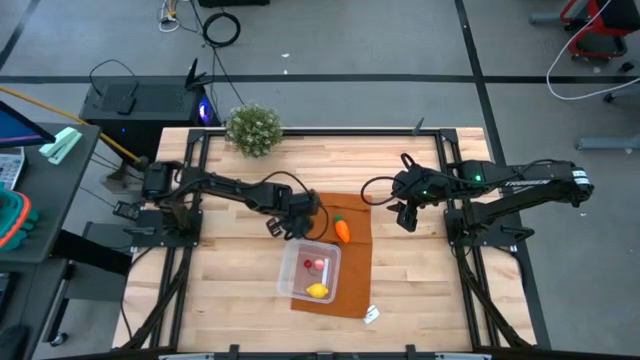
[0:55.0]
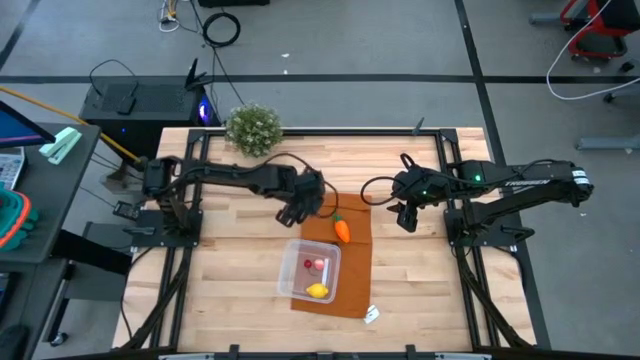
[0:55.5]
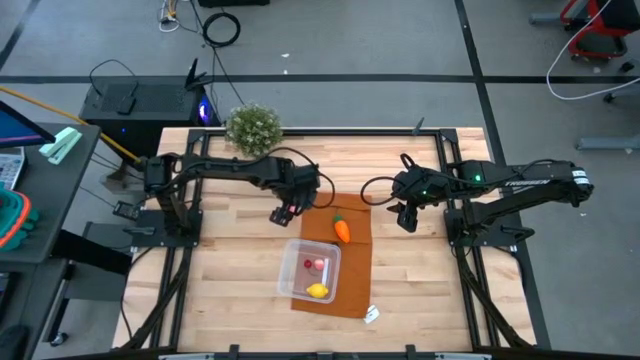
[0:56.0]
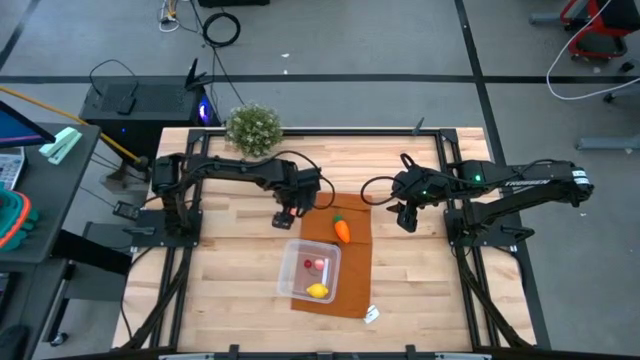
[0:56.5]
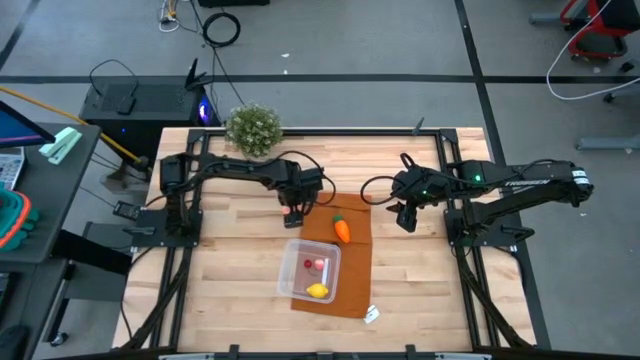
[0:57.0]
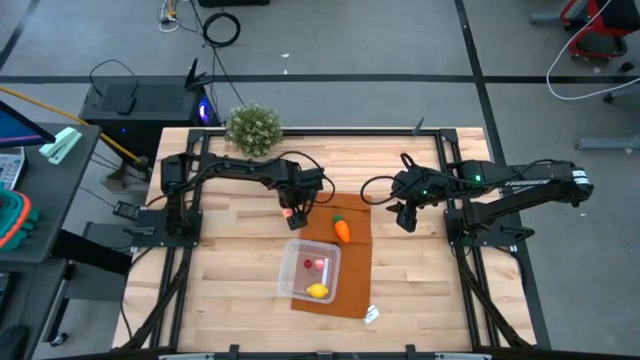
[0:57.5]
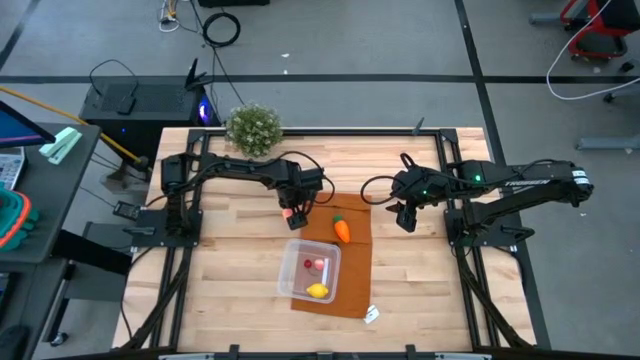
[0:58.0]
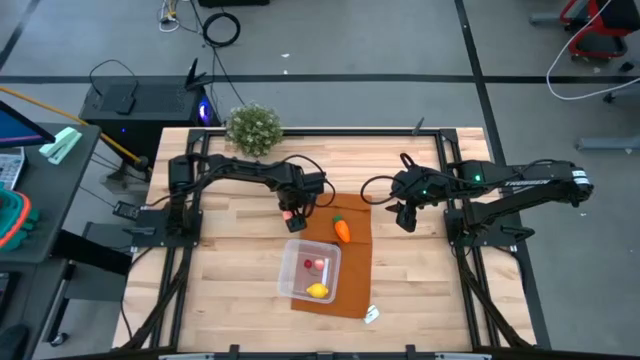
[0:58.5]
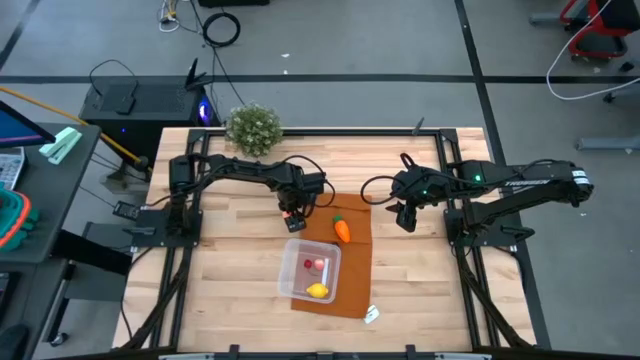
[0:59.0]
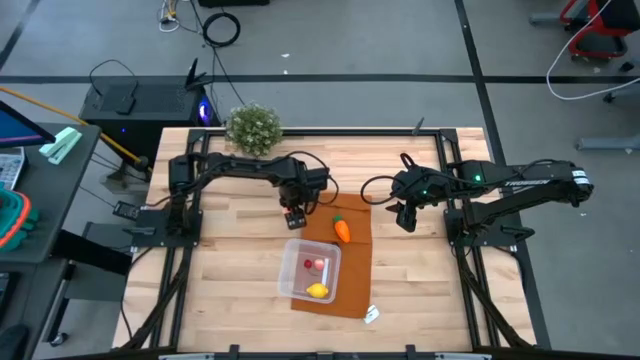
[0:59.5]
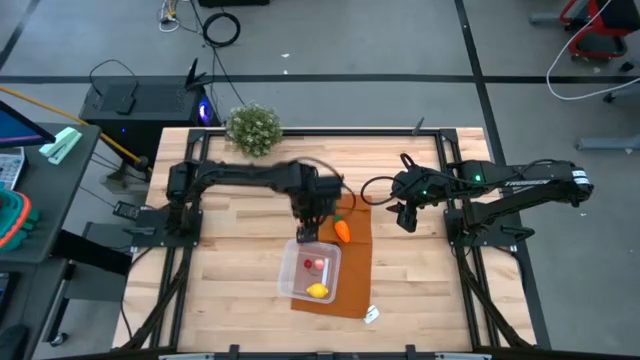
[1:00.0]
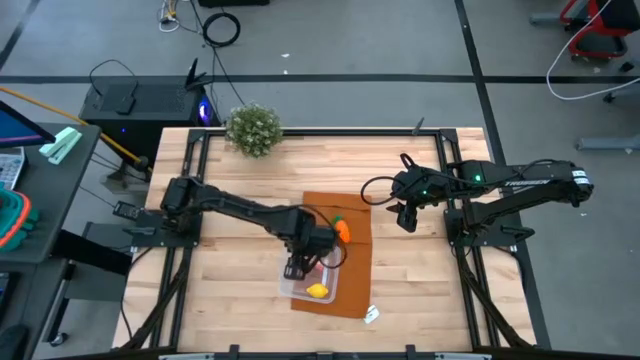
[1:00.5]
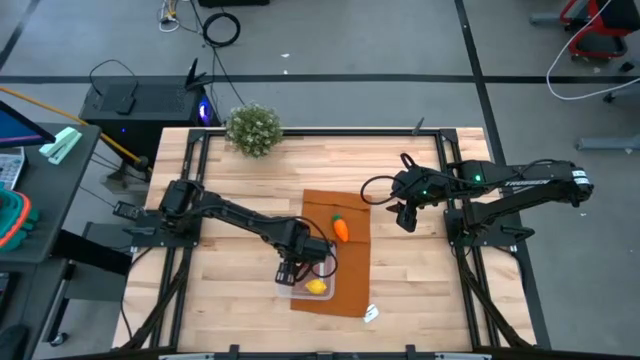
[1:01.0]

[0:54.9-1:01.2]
Task: Pick and placing Produce into tupperware
Put the large pink peach into the transparent bin

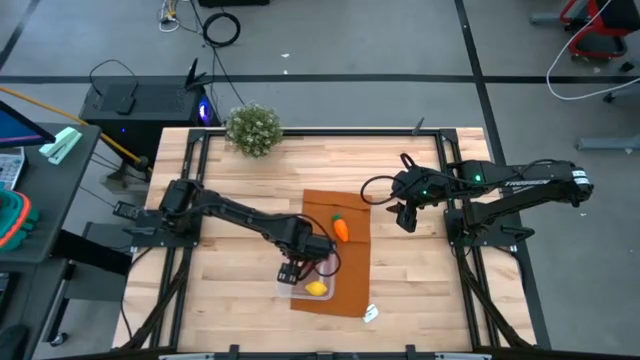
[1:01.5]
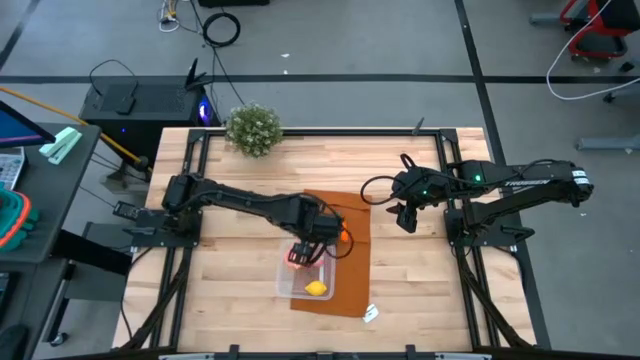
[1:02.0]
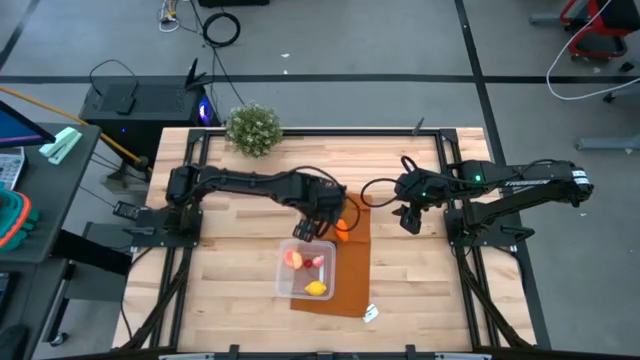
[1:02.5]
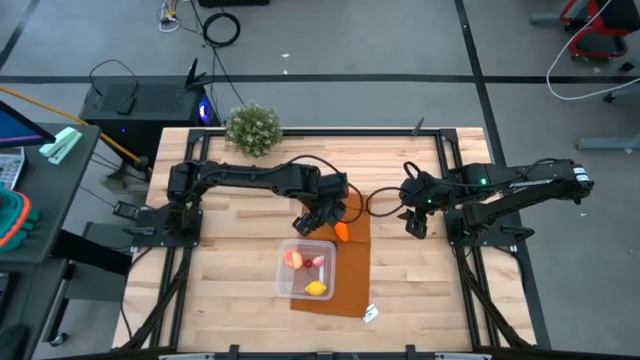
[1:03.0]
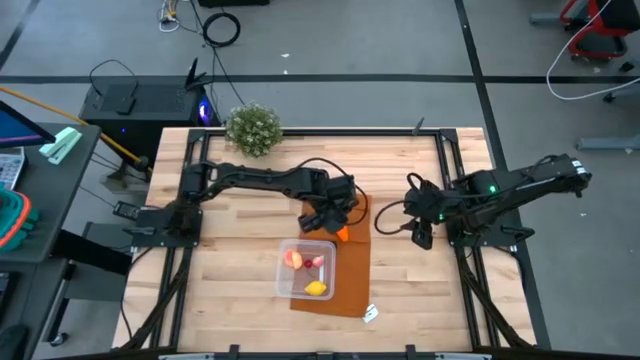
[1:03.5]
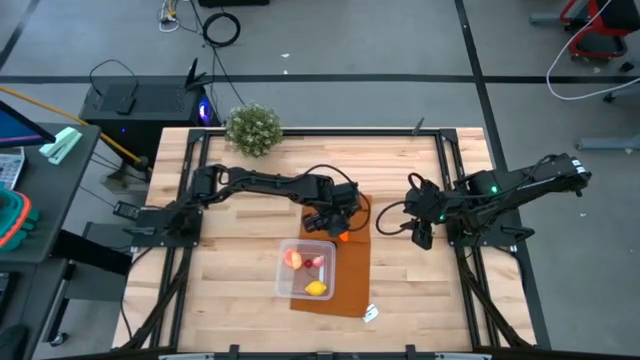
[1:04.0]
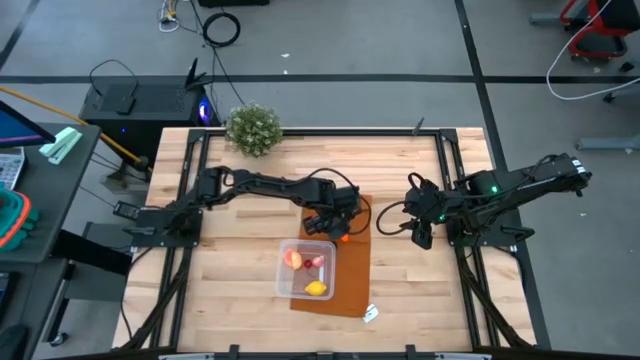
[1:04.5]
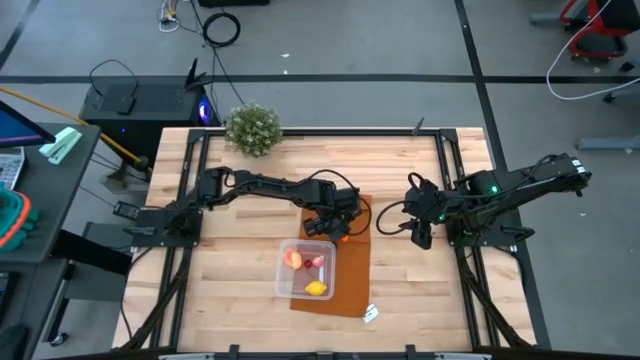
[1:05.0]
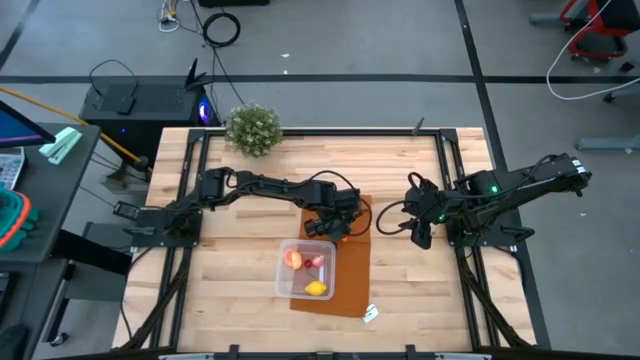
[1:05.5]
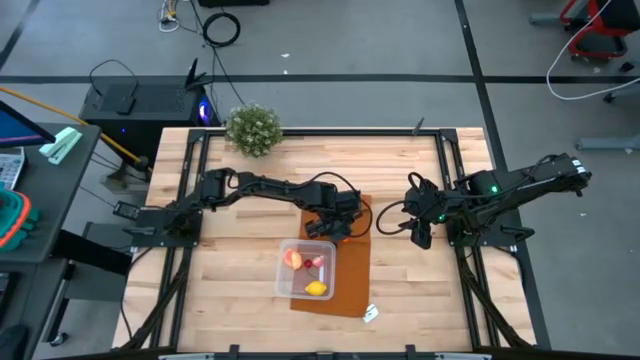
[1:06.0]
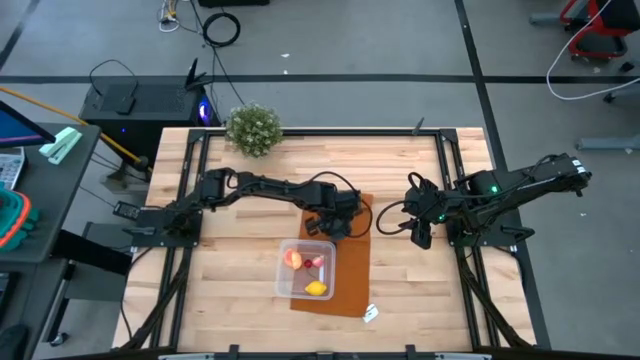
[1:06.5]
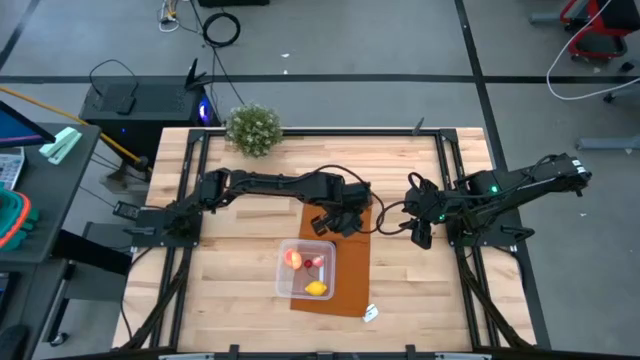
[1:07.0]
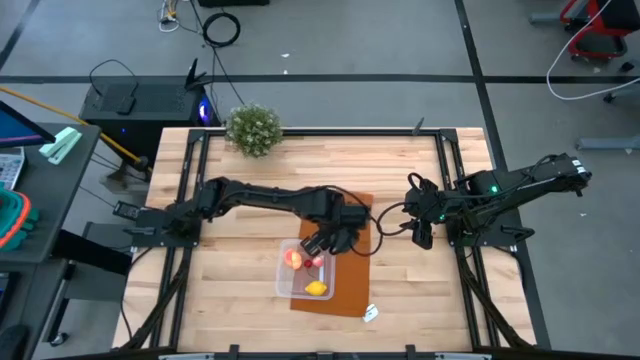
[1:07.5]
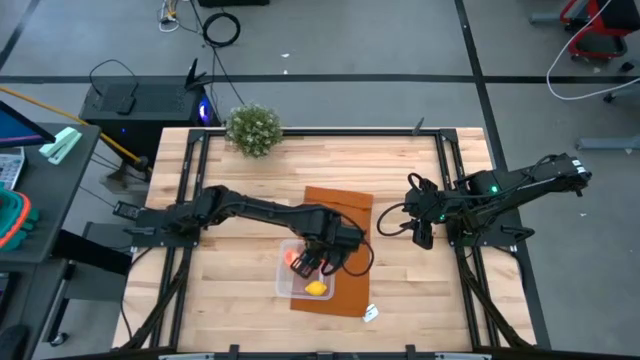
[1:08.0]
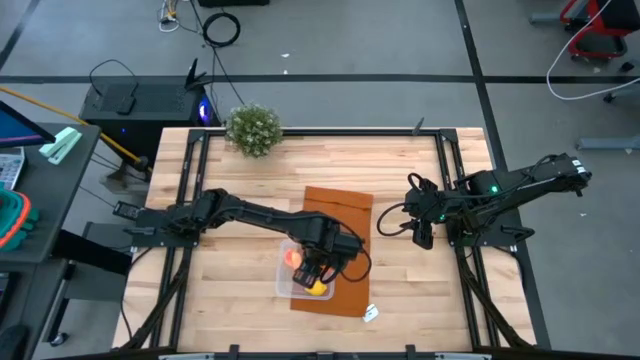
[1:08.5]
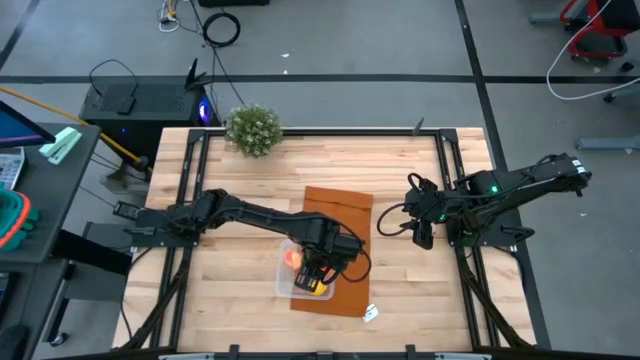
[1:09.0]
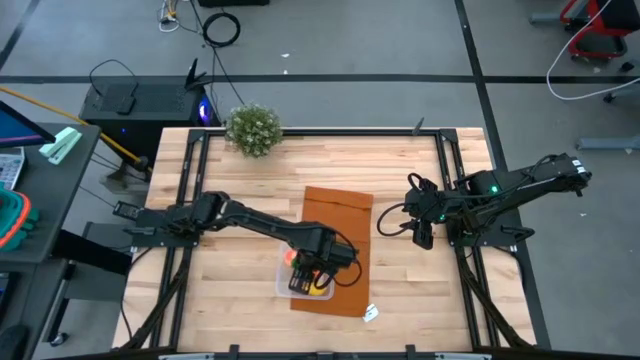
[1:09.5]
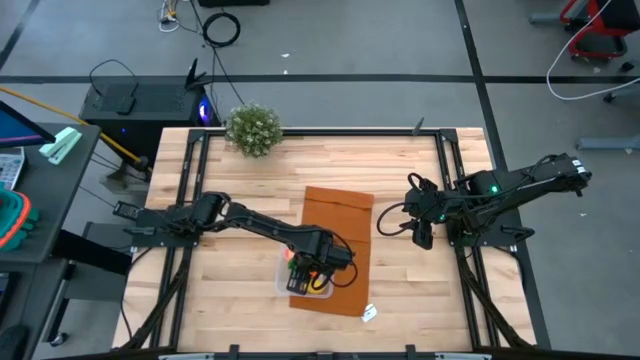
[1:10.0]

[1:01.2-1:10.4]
Put the orange carrot into the transparent bin

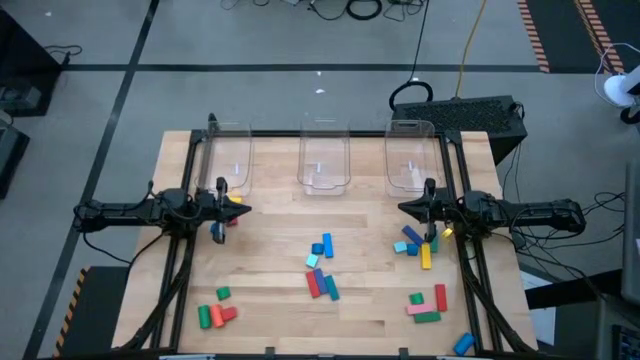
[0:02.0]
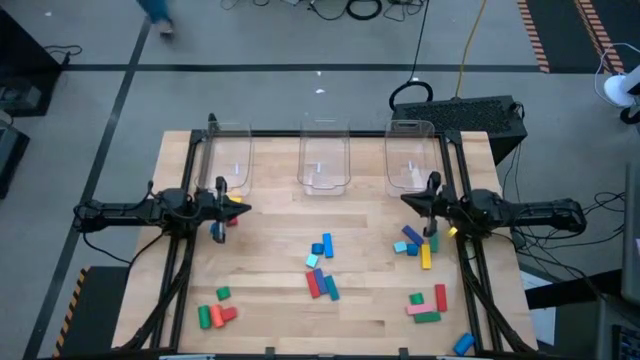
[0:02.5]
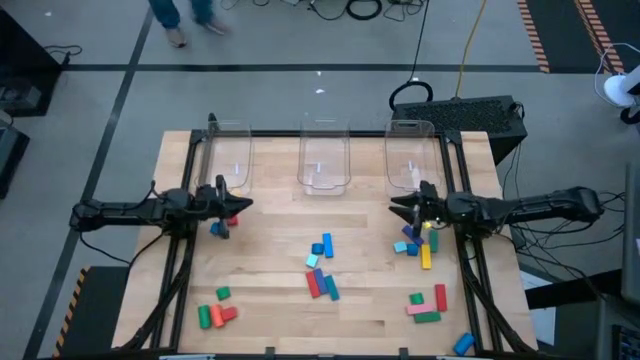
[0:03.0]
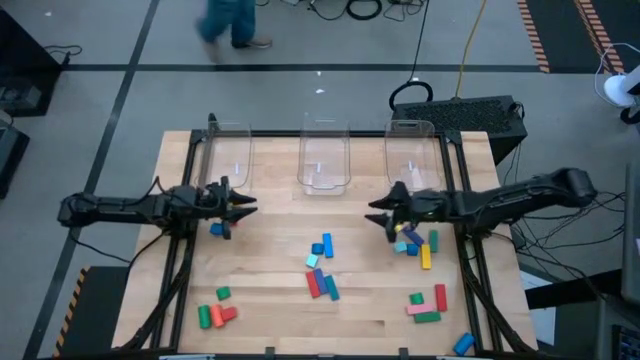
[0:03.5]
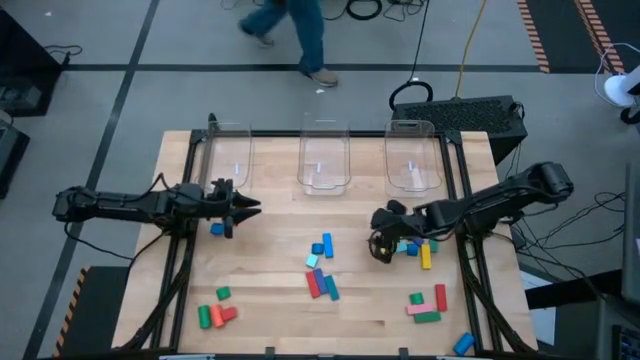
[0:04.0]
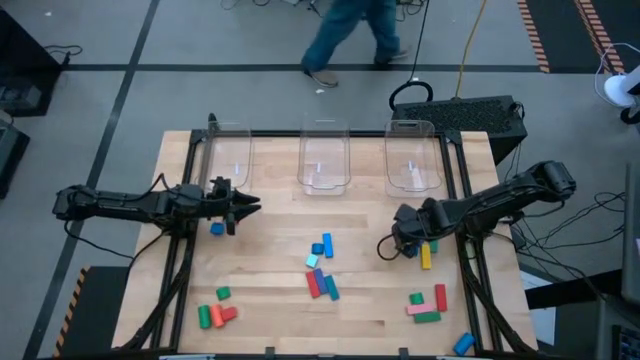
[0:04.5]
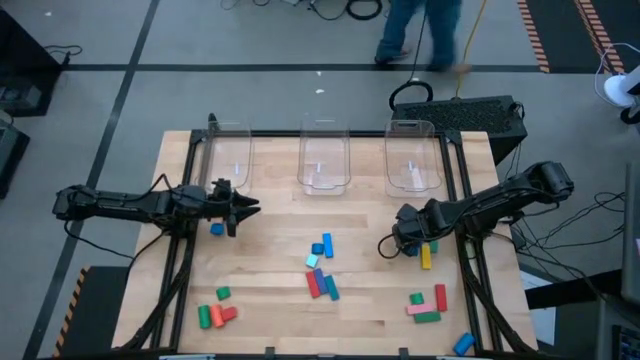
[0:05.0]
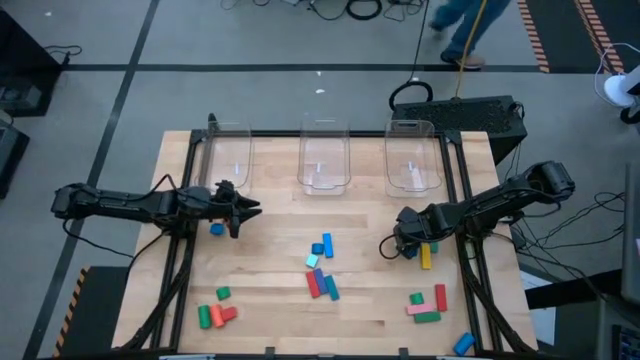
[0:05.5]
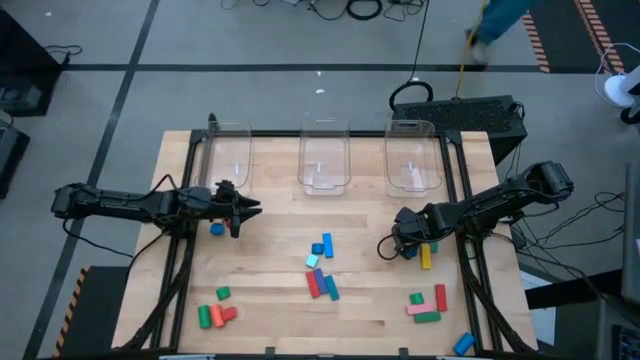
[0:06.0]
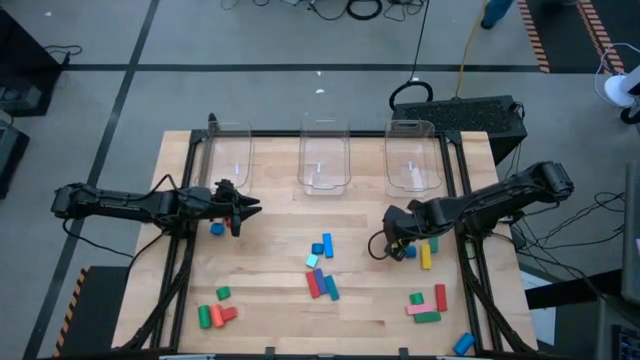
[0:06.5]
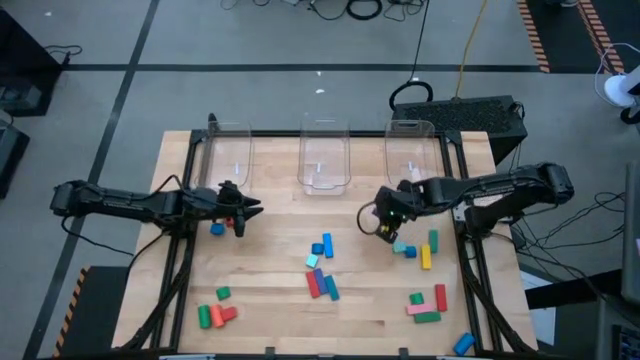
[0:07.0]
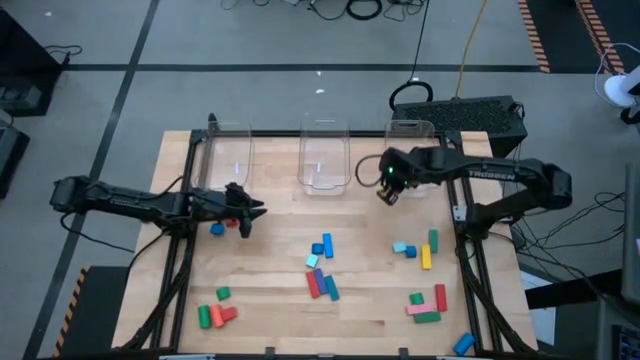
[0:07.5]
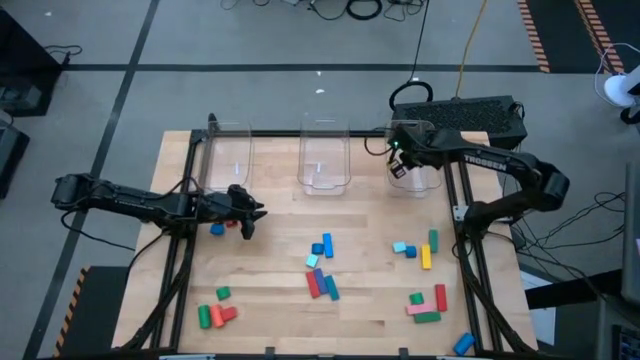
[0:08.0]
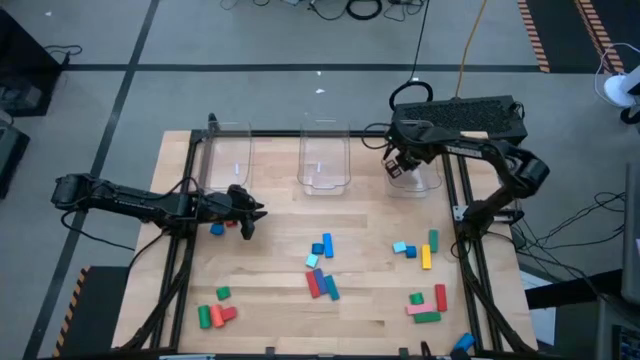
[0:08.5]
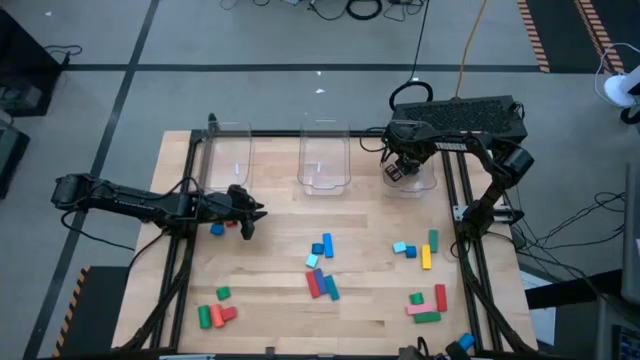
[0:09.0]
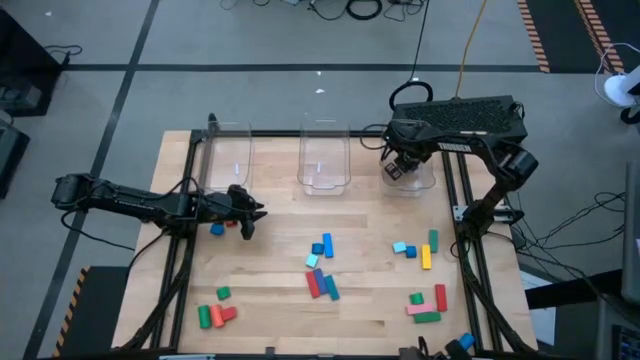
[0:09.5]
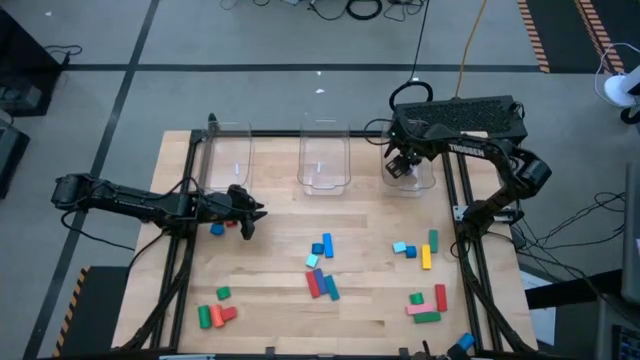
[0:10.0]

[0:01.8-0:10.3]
Task: Sort blocks by size
Put the blue rectangular block into the right transparent bin
